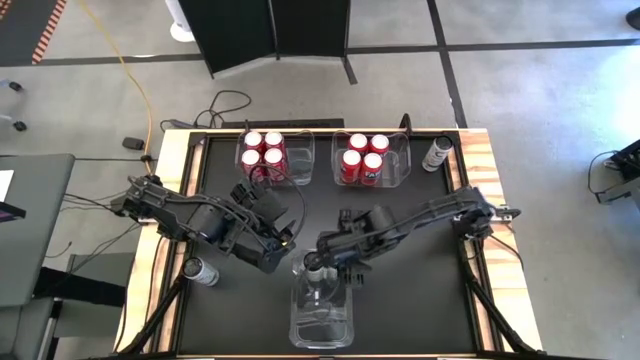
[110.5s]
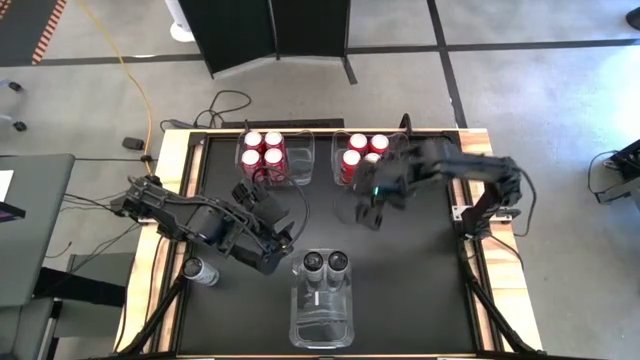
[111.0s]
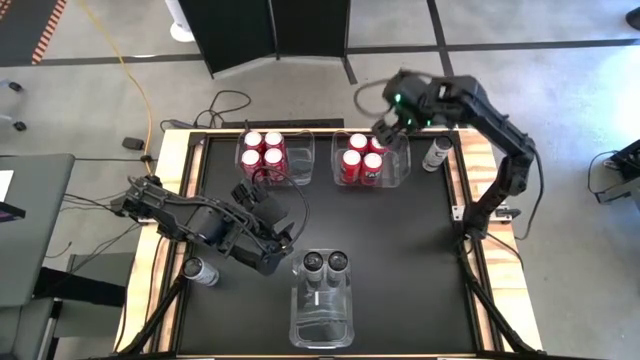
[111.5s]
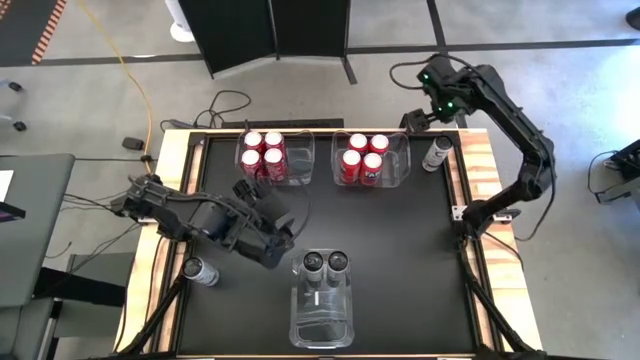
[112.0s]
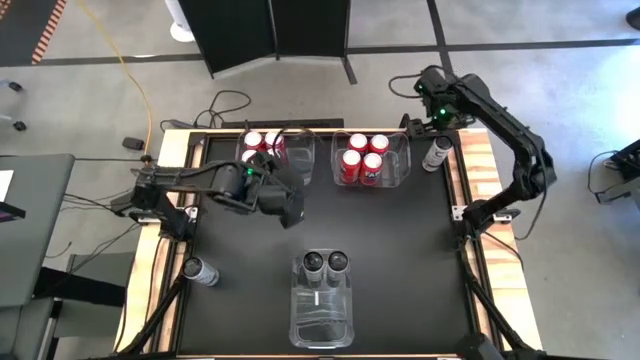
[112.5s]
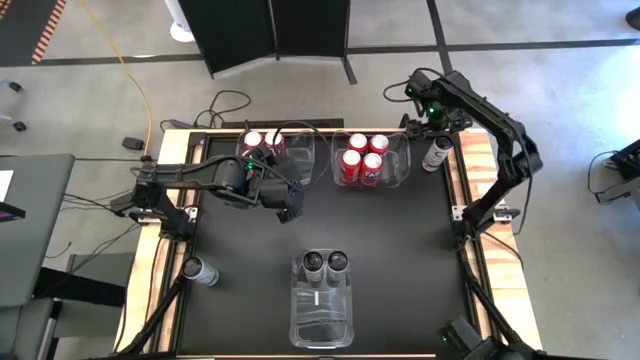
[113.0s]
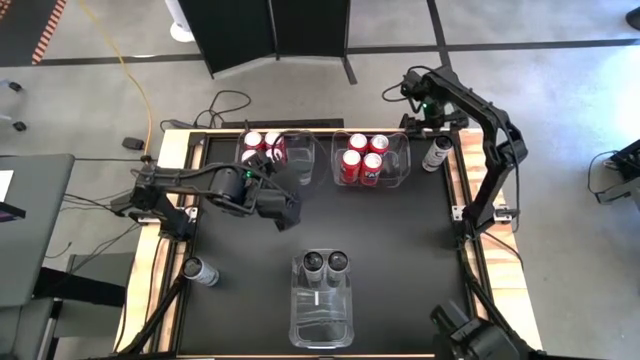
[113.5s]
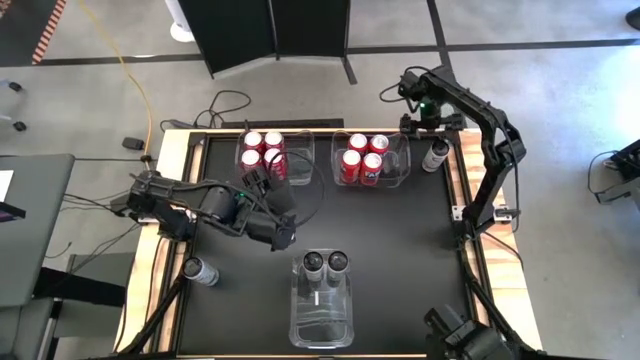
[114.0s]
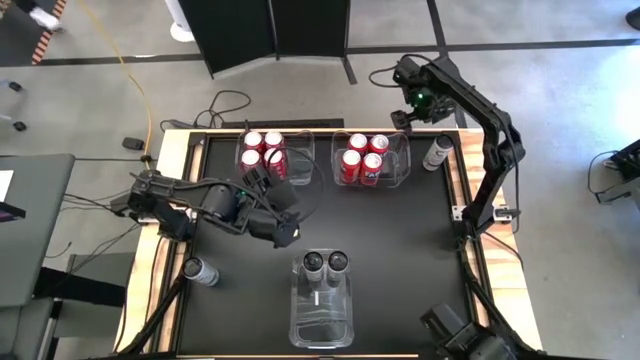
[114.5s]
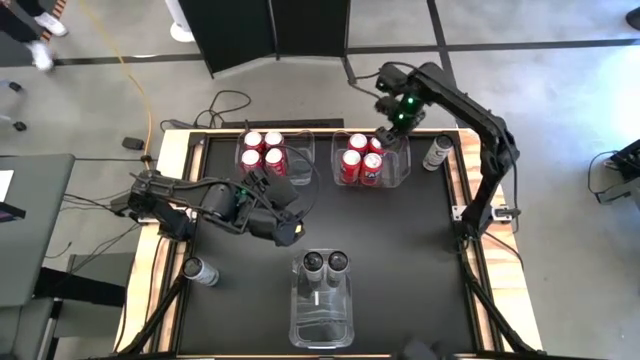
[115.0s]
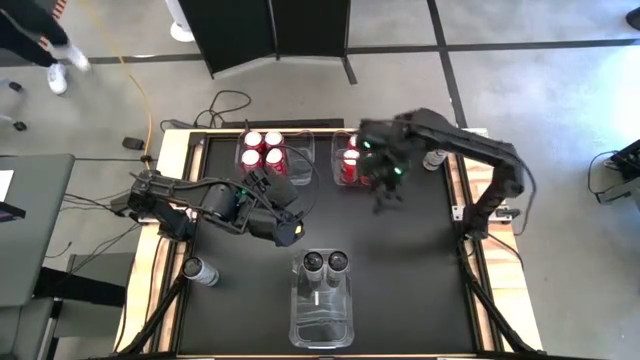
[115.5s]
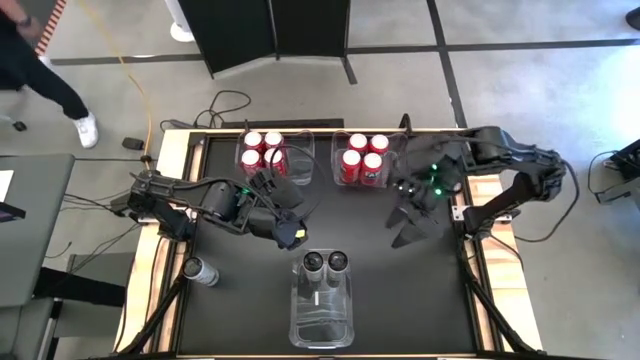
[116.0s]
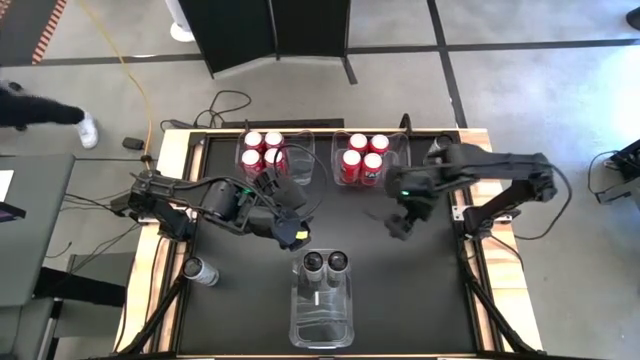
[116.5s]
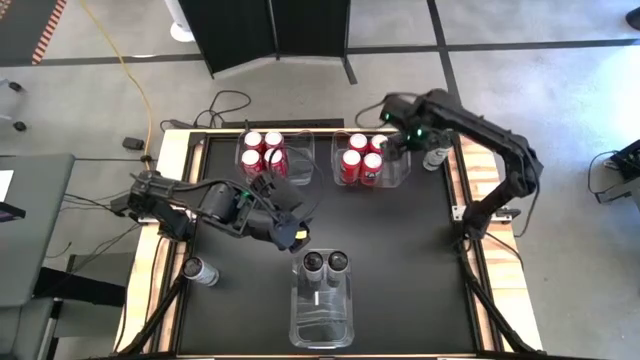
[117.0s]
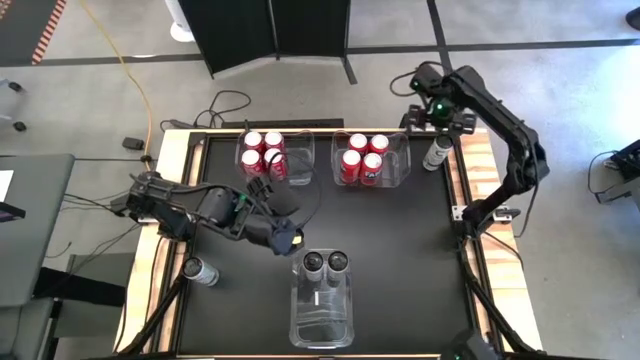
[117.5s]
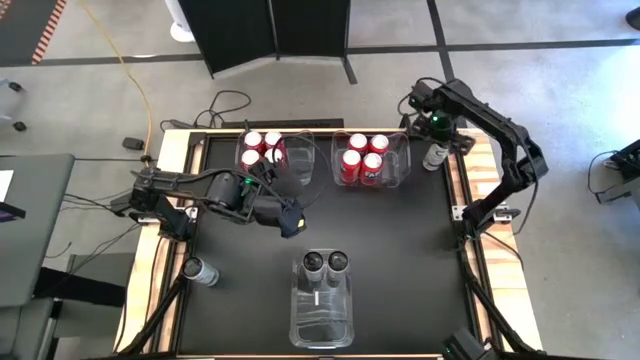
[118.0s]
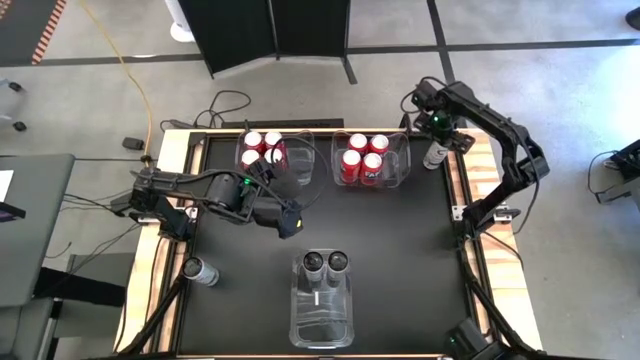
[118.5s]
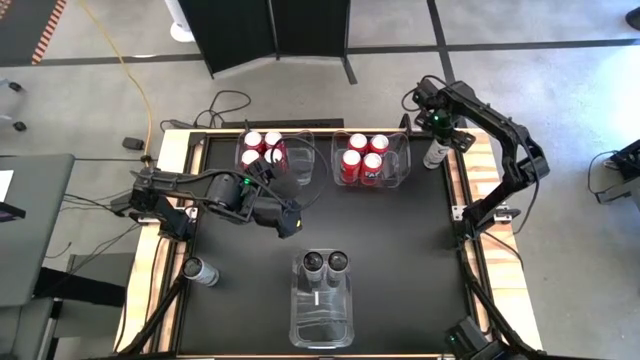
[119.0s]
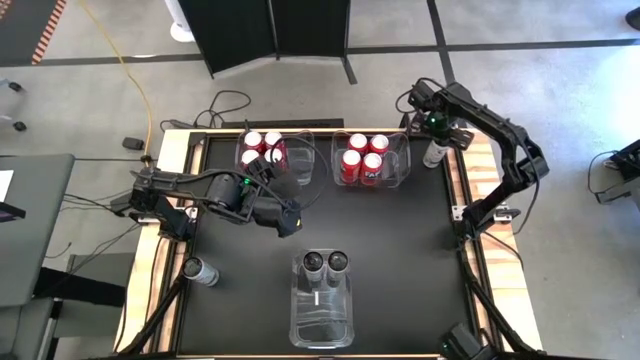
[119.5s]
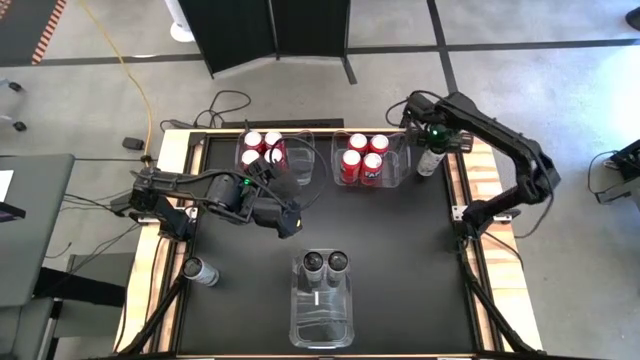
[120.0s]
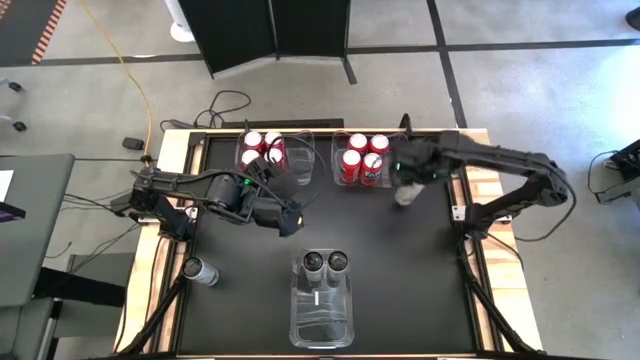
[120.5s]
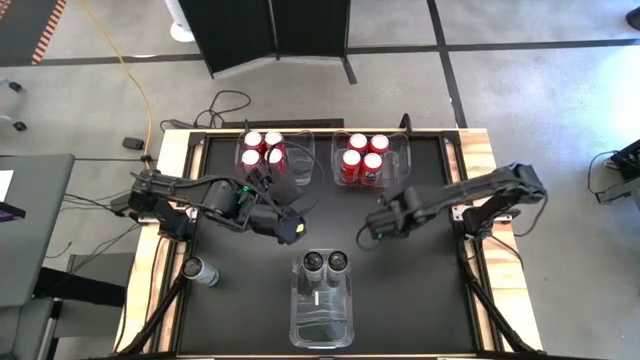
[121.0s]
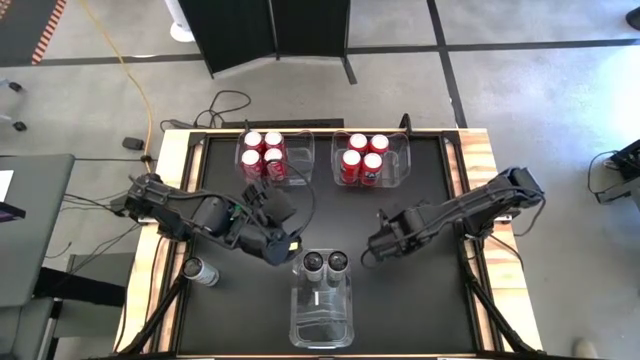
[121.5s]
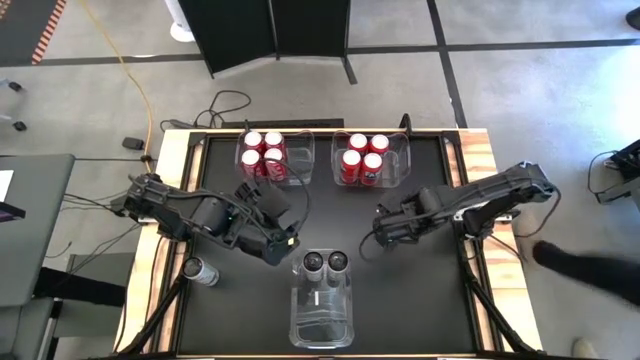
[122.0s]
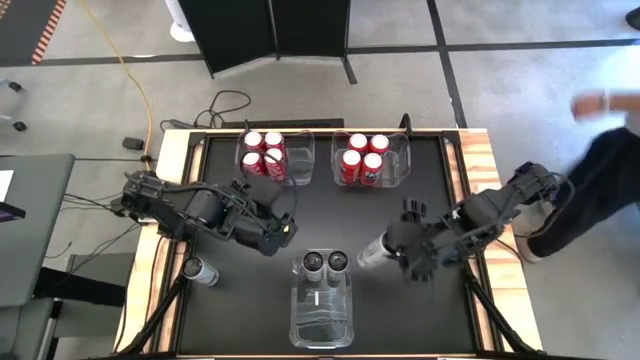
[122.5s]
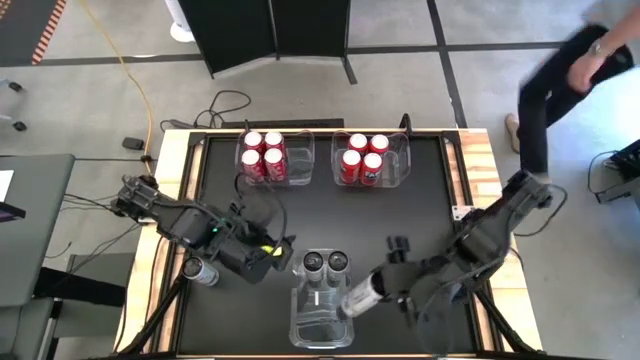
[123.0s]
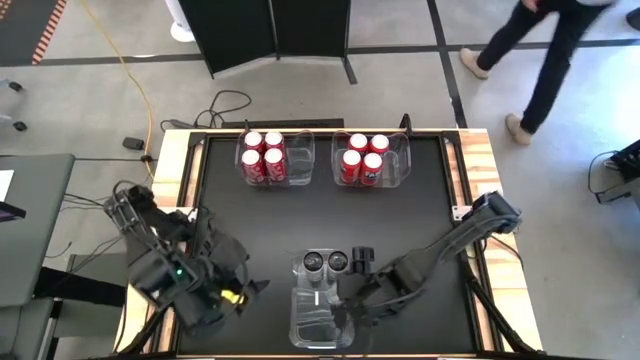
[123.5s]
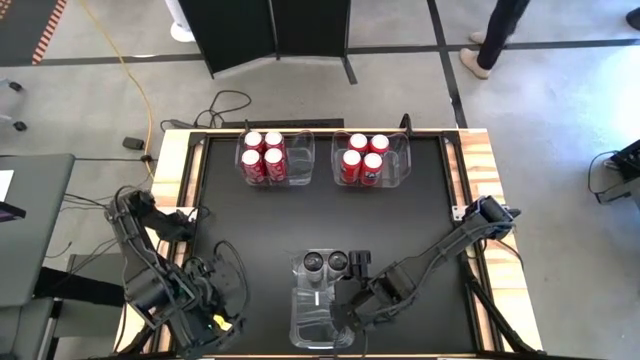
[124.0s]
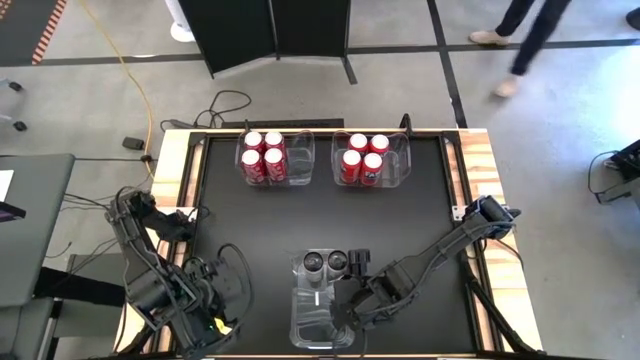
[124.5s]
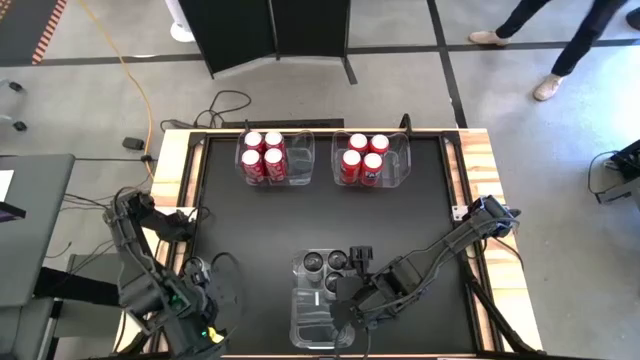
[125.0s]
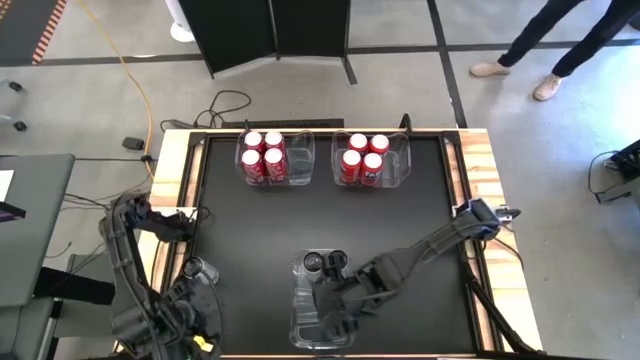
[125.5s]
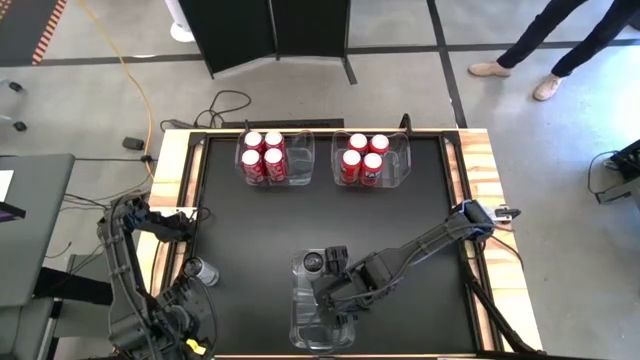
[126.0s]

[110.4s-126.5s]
Task: Sort soda cans
Put the white yellow soda can into the bottom transparent bin

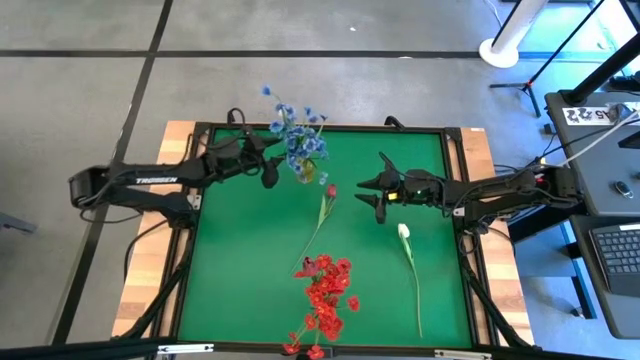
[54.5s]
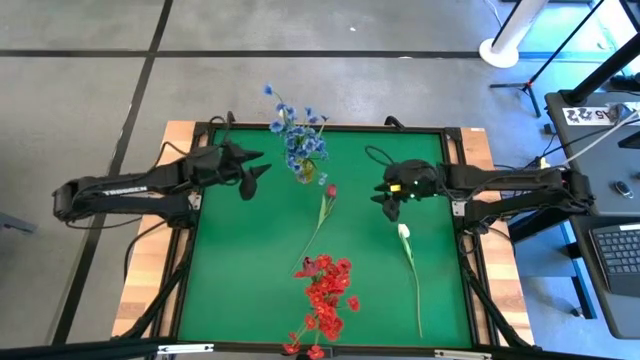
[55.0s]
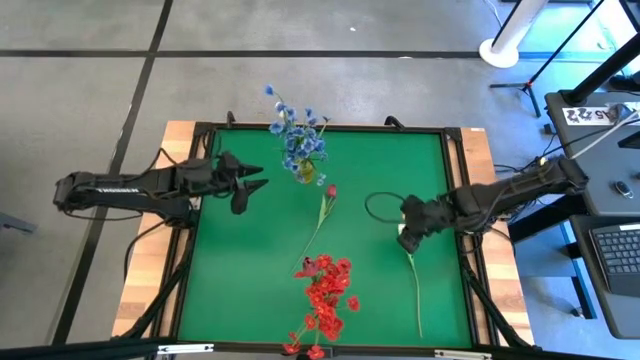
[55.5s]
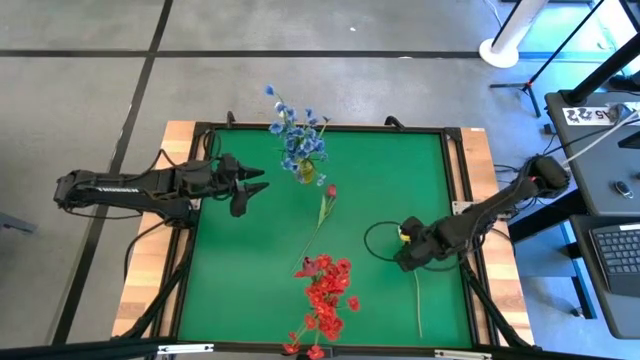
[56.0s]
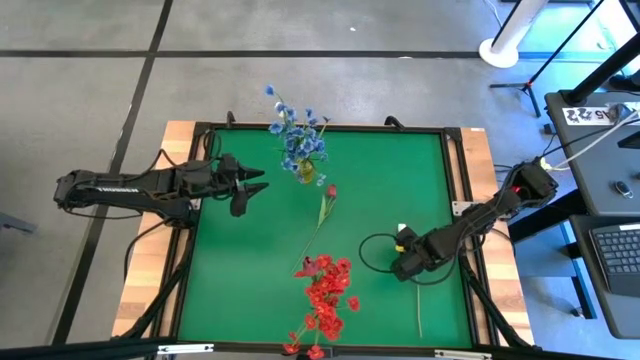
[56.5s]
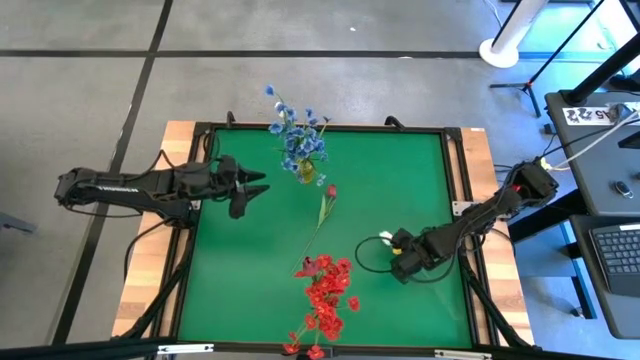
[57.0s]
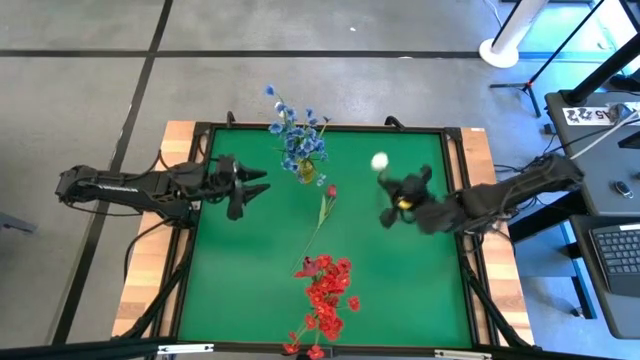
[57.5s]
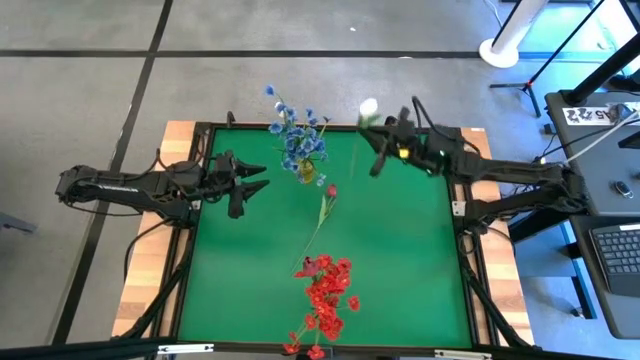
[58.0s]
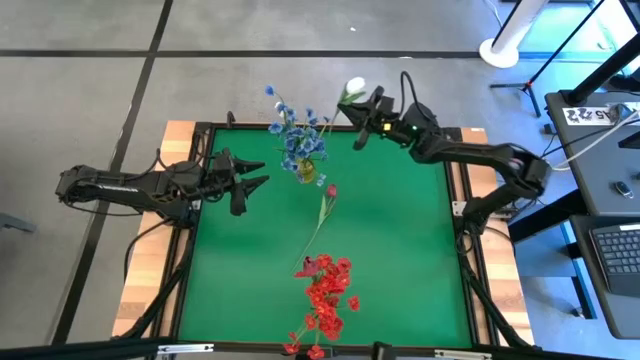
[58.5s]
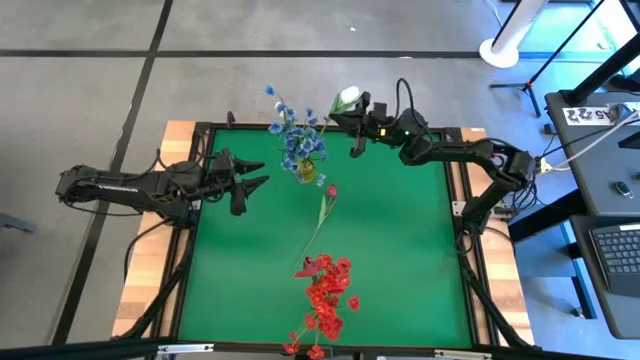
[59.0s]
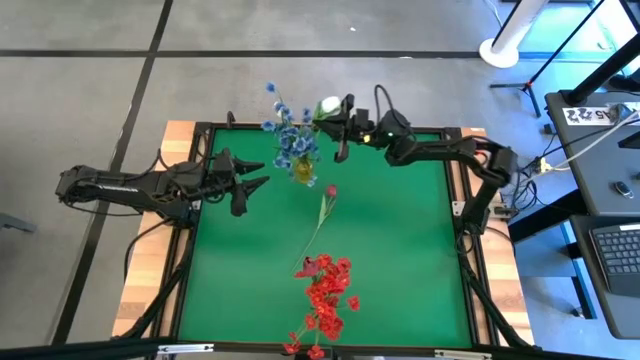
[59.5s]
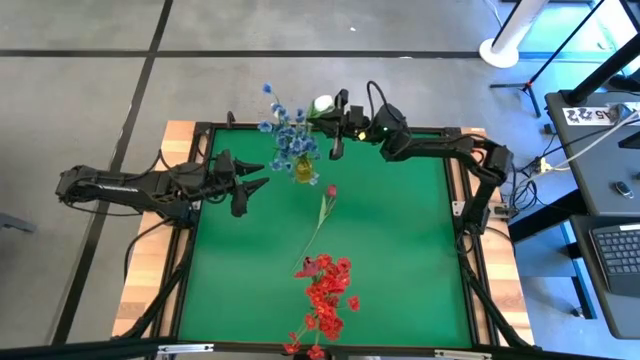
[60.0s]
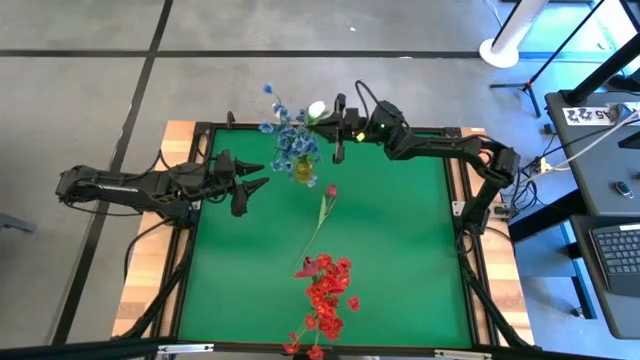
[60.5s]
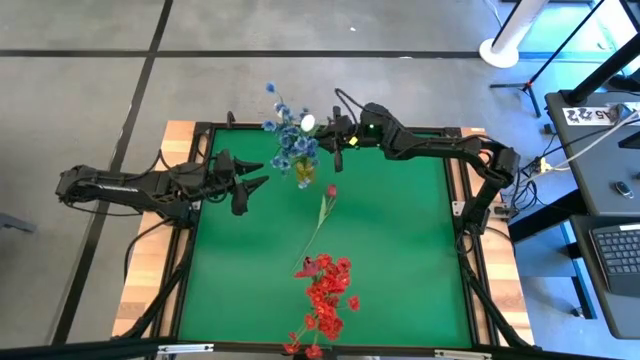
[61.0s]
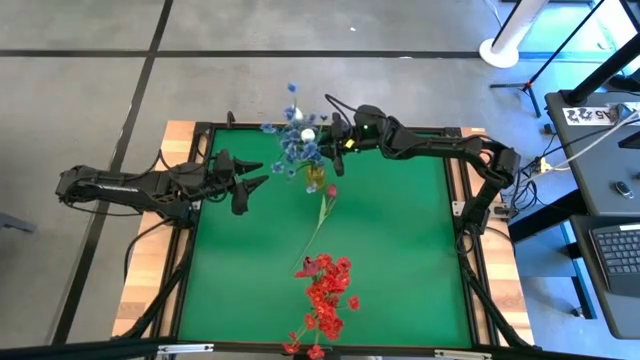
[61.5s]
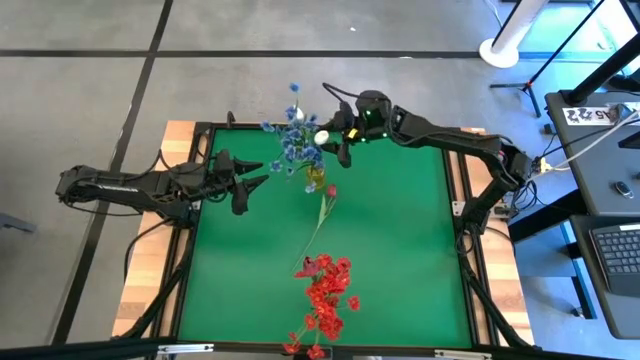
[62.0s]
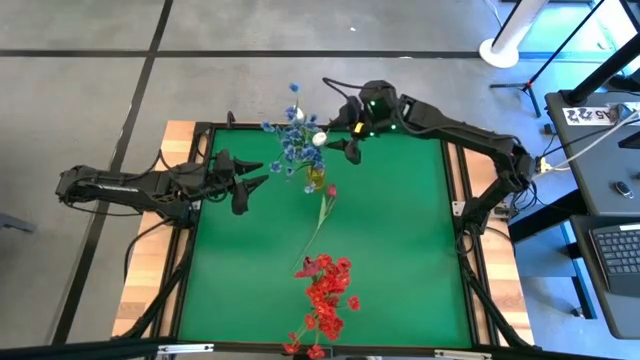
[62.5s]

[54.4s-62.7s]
Task: Sort flowers into vase by color
Put the white flower into the yellow vase
